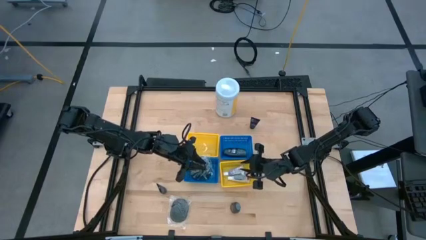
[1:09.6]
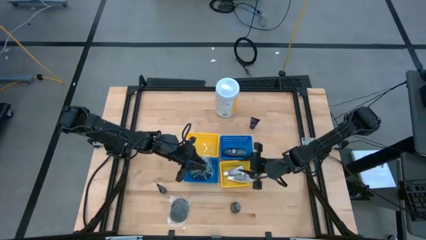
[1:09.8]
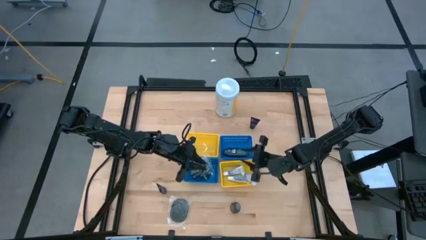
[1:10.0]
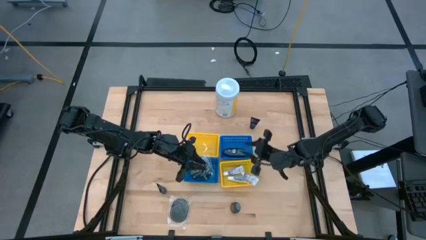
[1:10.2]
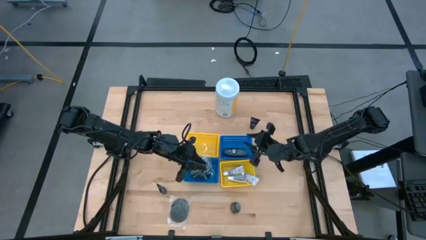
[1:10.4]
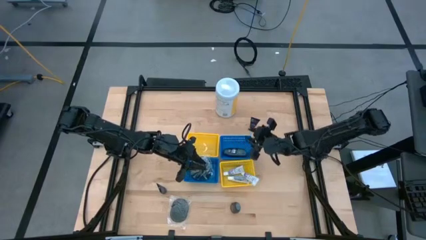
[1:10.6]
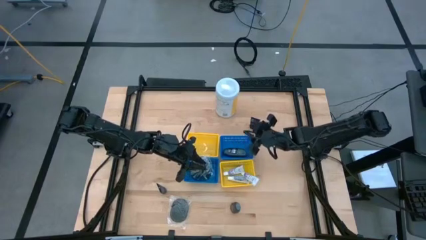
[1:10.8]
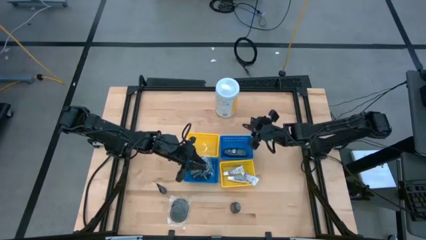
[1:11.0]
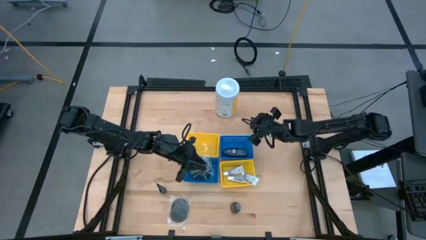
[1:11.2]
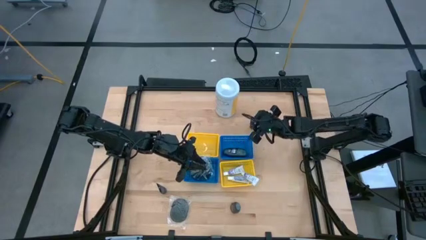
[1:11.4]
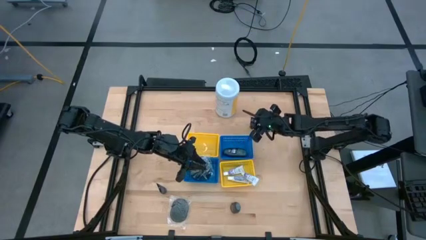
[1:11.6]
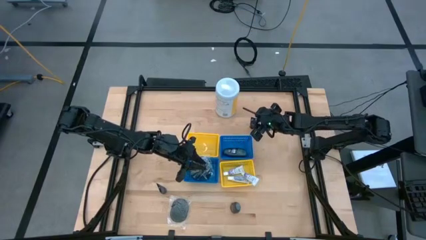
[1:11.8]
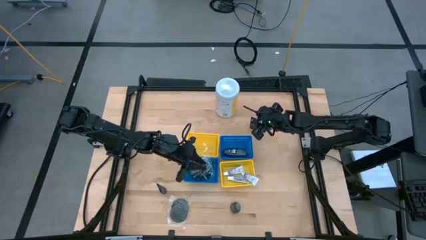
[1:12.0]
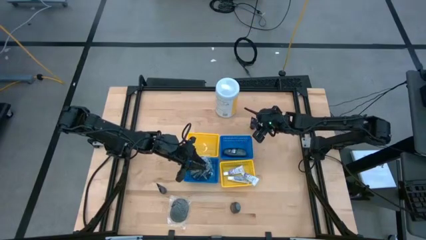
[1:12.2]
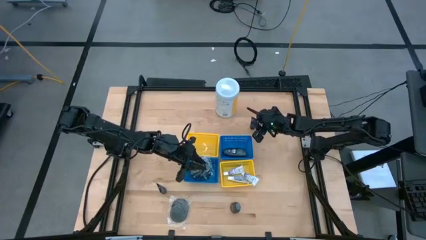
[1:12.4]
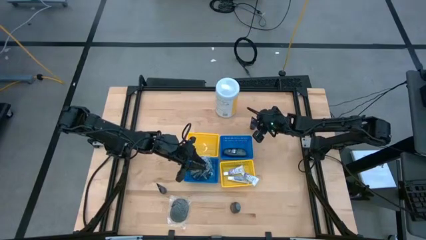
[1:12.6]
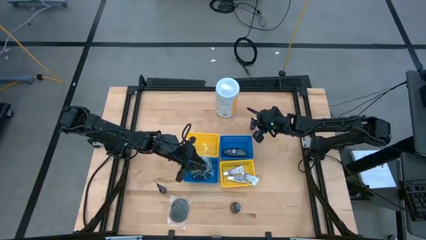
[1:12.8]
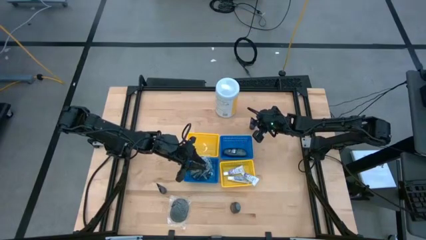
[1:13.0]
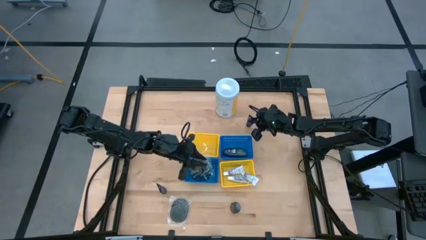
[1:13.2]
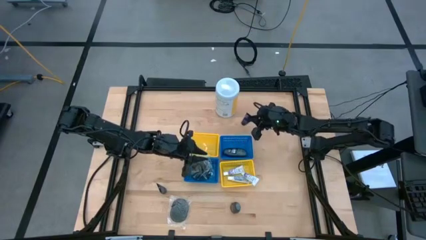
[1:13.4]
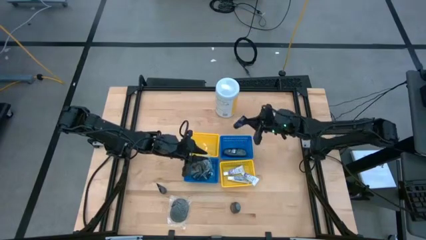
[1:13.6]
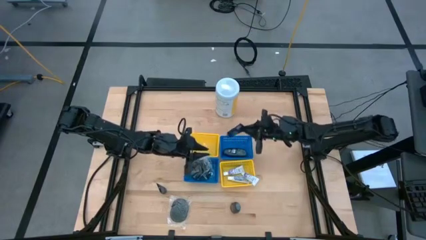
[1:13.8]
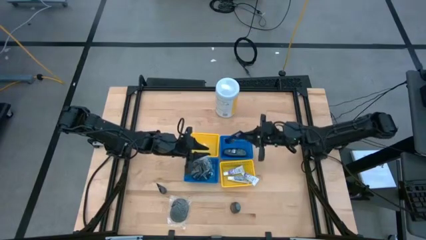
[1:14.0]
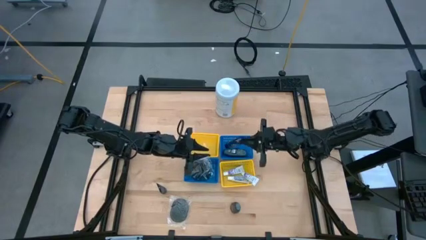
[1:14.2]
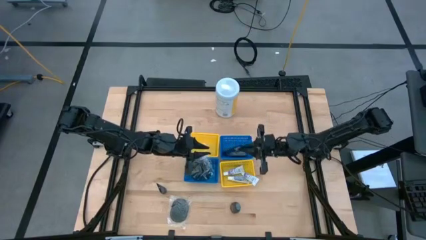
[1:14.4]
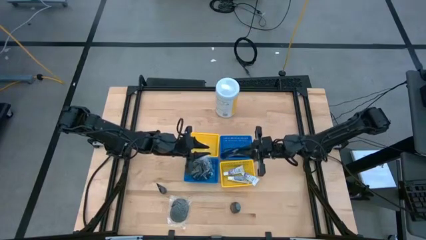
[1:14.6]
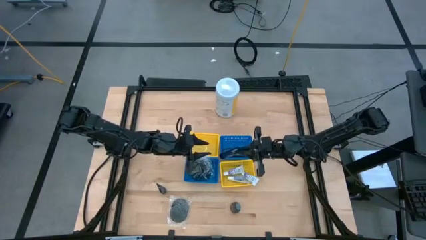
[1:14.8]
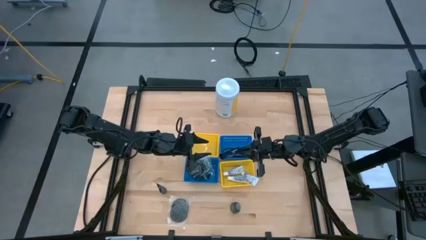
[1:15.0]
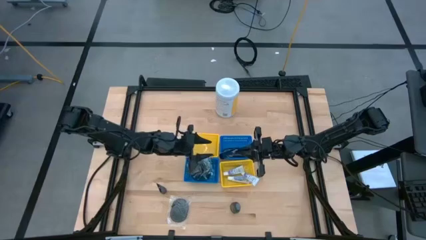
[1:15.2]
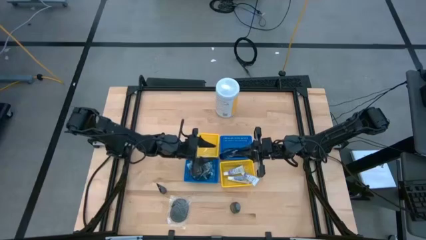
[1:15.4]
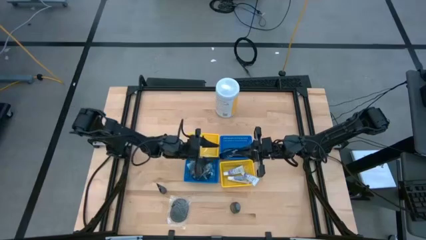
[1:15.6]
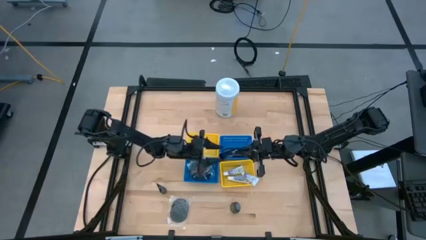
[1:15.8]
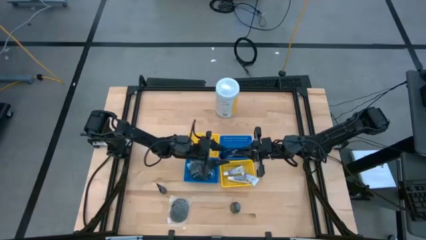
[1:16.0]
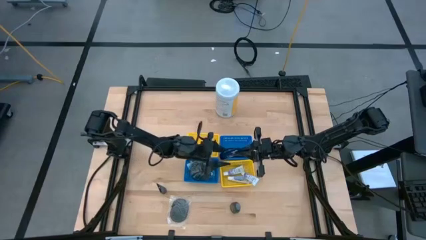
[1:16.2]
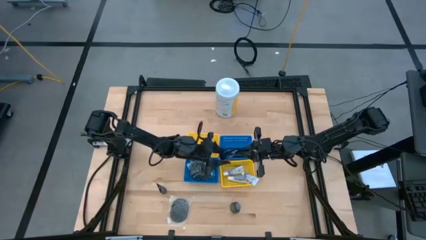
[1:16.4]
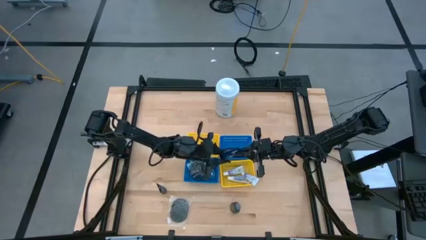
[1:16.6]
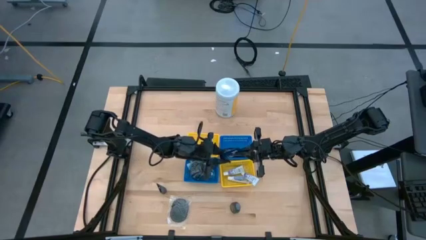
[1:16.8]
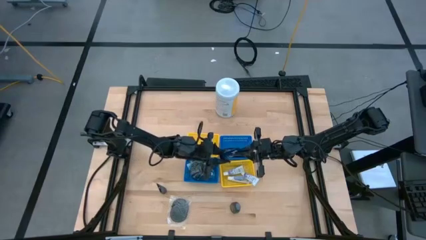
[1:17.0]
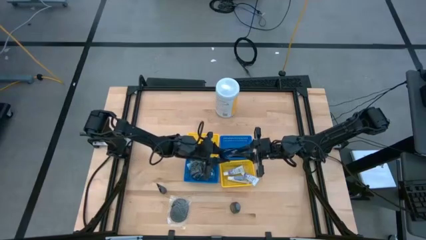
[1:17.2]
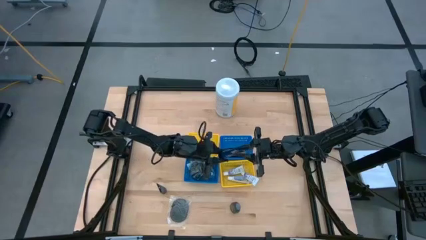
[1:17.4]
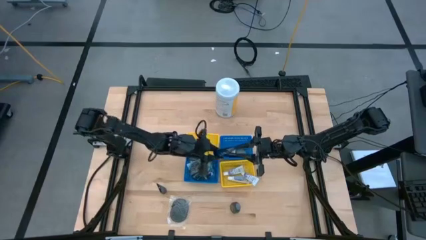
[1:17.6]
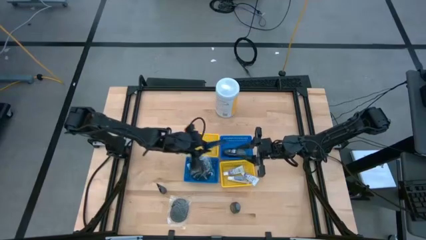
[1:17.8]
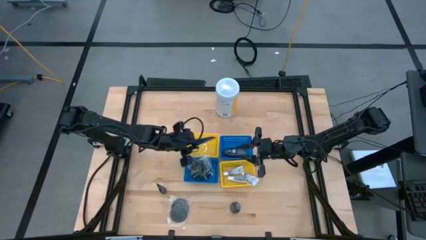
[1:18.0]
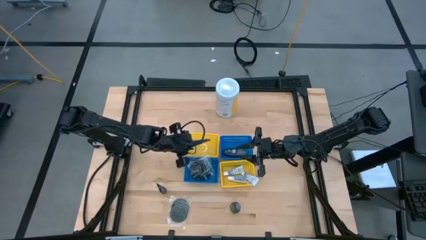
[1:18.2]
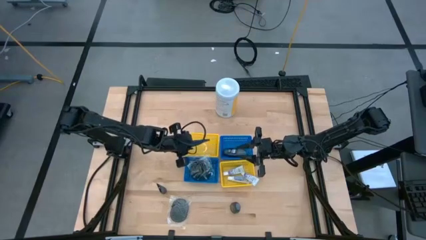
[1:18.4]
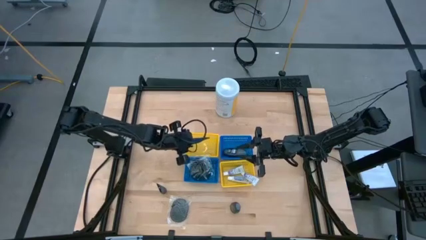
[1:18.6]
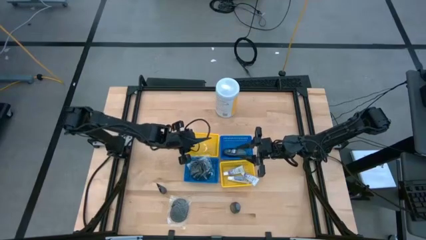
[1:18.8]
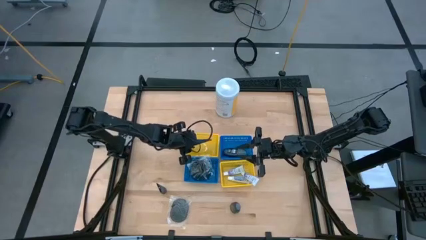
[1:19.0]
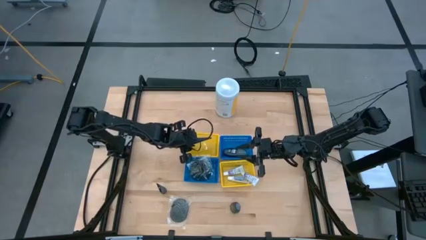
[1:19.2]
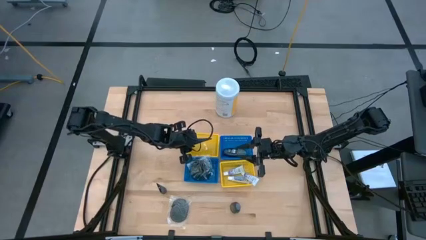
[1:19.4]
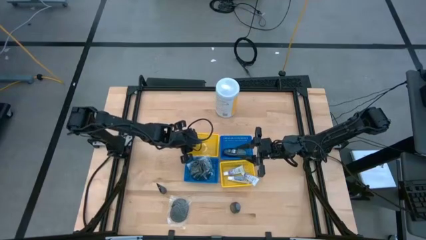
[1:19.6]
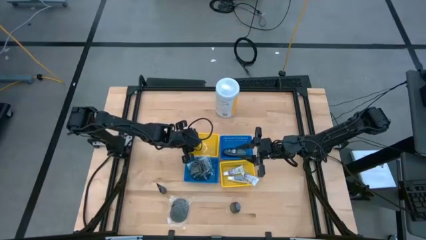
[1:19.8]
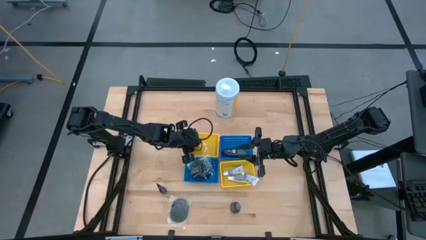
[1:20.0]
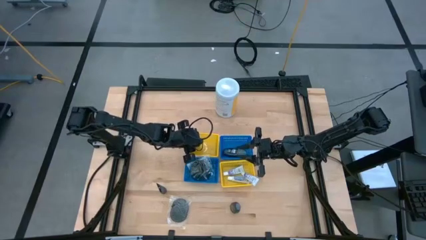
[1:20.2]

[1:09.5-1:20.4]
Task: Pick & Place Travel size toiletries
Put the blue shave cream into the top yellow bin

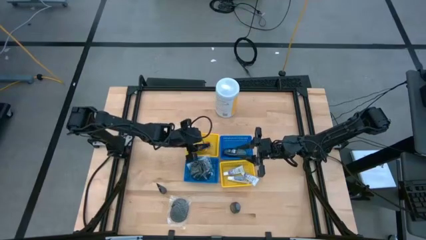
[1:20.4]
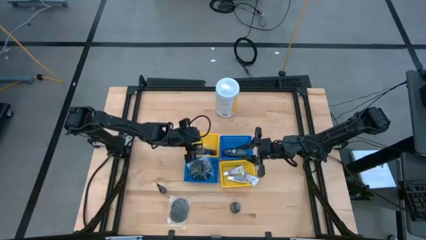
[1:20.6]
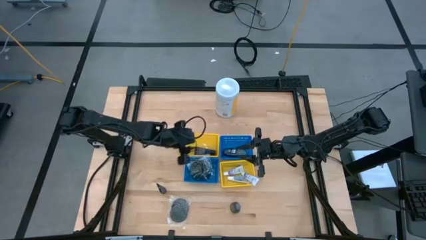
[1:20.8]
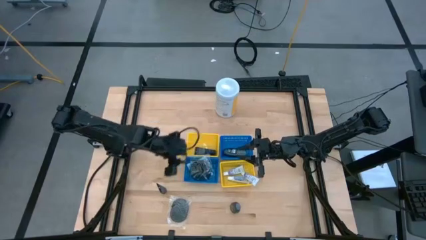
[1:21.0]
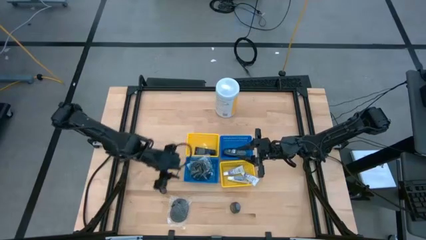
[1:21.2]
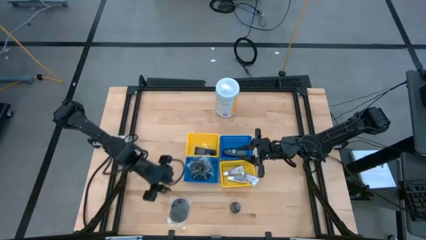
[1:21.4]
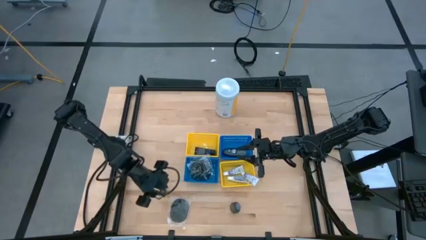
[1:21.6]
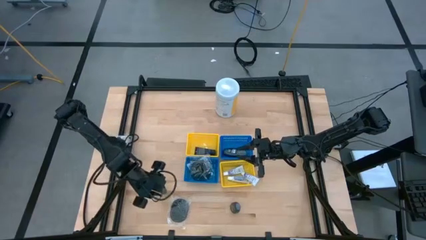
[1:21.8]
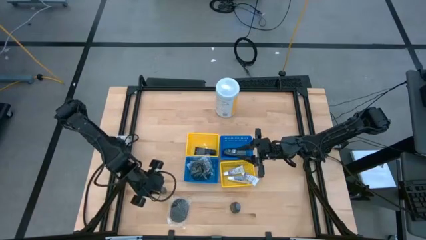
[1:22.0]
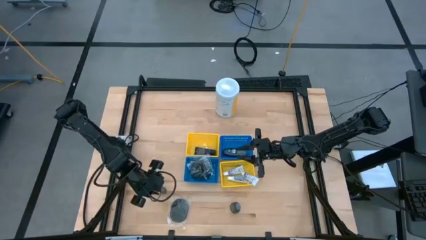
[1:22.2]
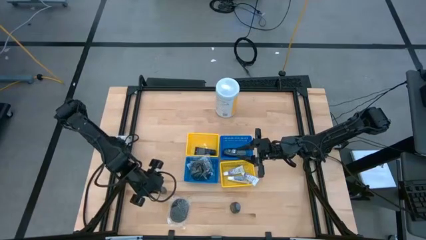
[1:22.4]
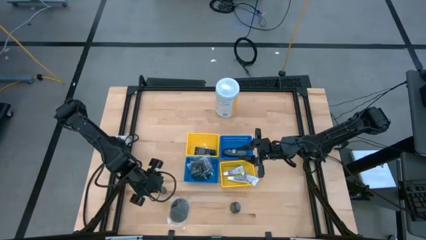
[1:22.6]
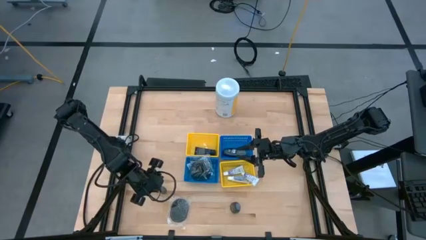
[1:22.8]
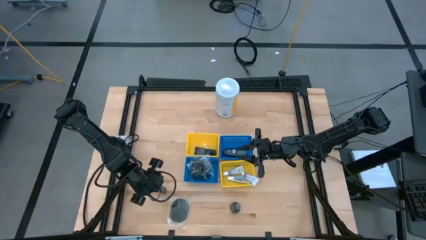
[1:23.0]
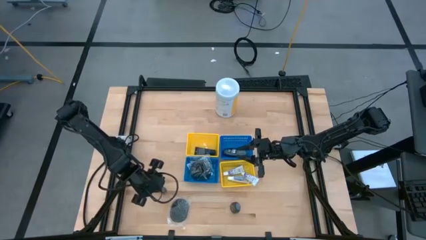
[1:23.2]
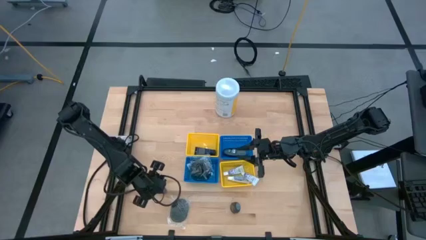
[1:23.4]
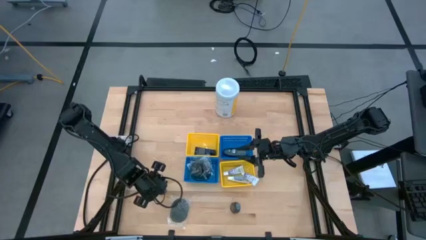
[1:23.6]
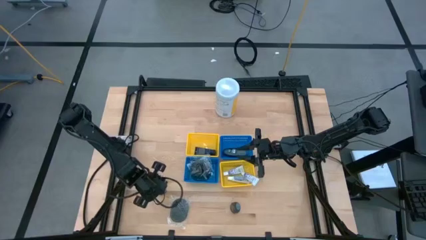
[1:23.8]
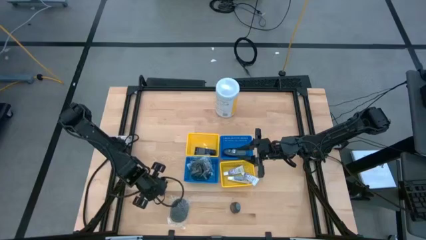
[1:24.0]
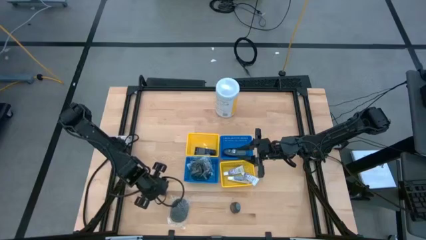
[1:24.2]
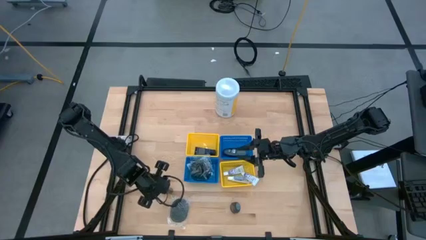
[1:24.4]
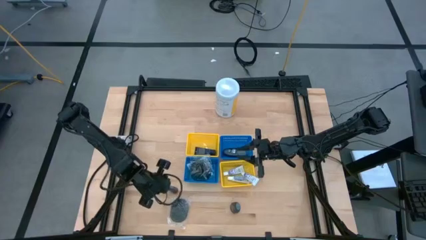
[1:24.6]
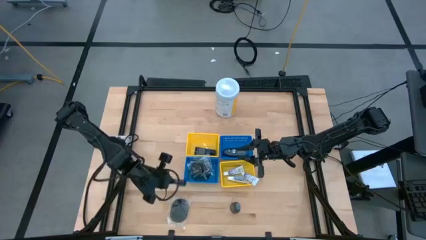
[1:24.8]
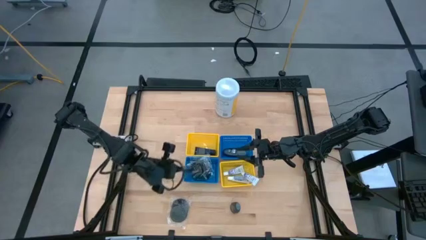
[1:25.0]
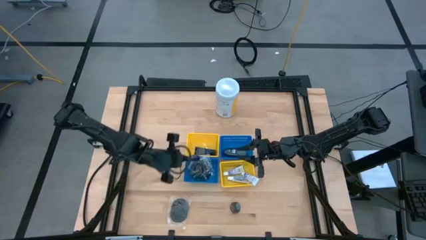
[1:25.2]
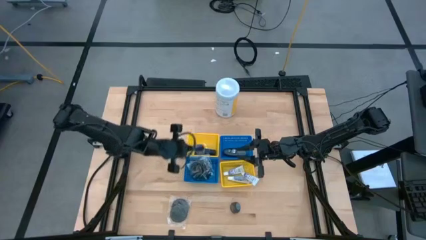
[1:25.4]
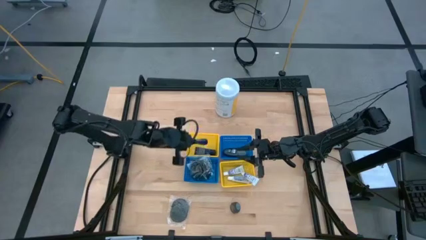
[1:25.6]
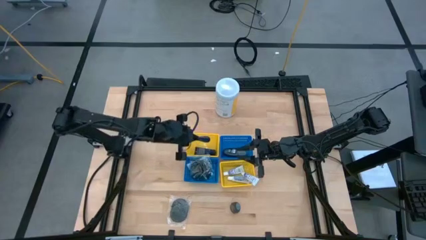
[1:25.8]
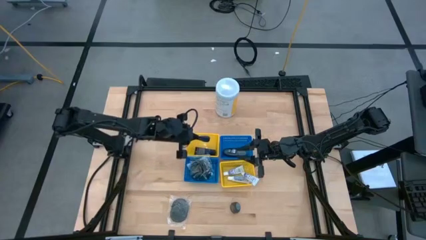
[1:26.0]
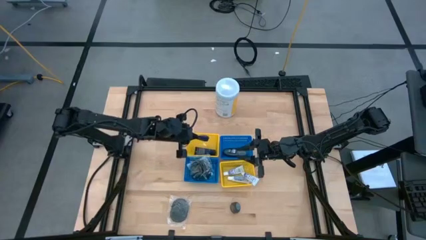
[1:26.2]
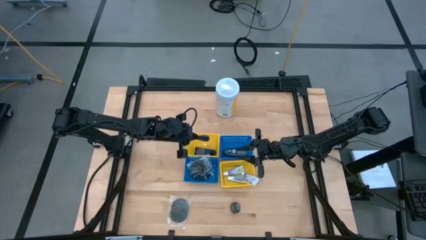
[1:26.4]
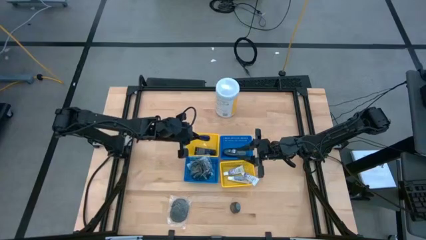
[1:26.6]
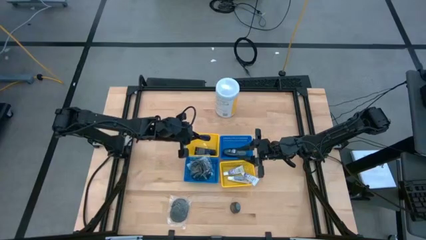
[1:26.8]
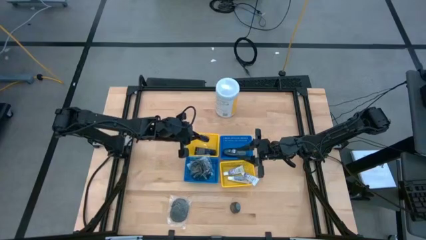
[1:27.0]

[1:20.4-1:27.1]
Put the blue shave cream into the top yellow bin
